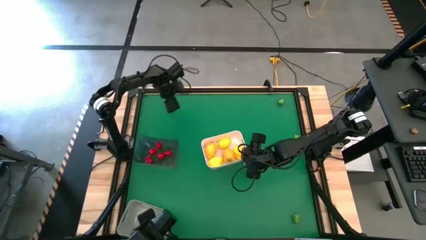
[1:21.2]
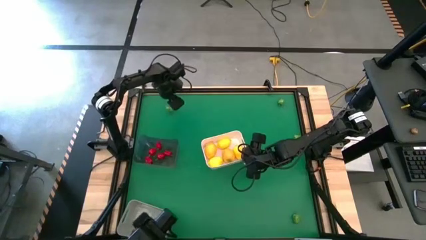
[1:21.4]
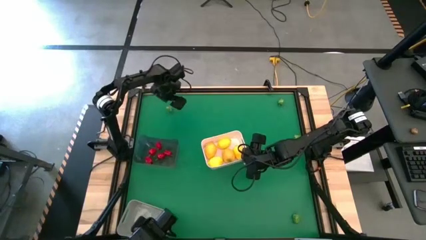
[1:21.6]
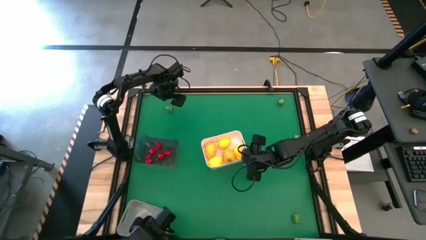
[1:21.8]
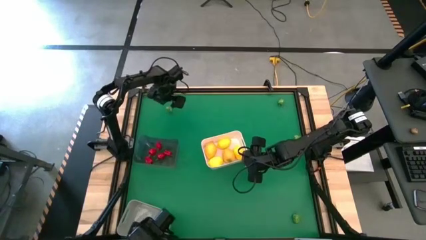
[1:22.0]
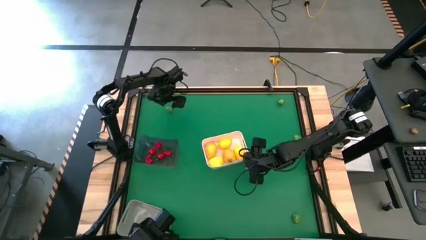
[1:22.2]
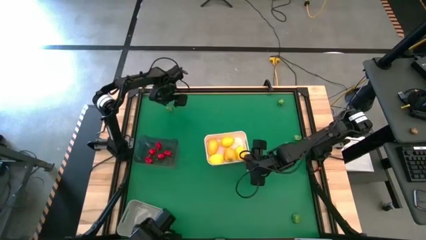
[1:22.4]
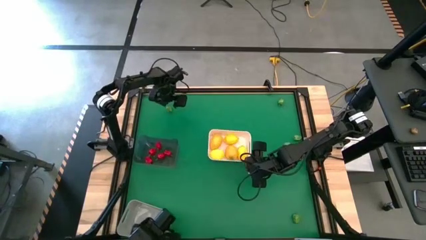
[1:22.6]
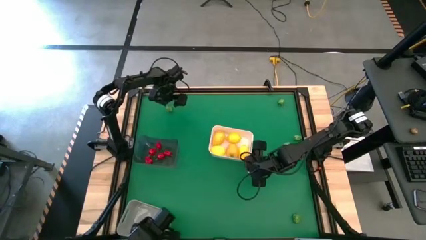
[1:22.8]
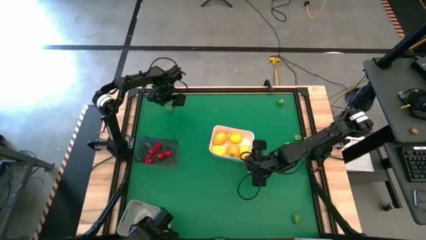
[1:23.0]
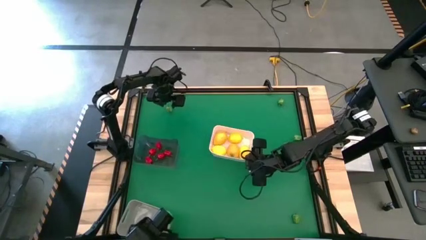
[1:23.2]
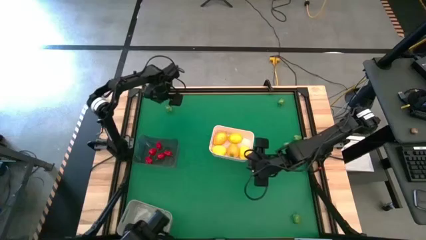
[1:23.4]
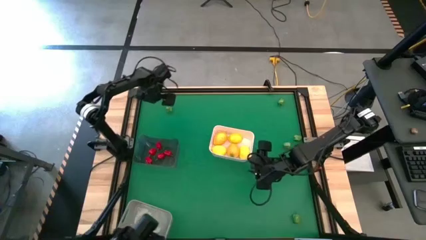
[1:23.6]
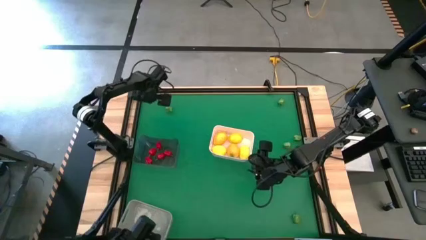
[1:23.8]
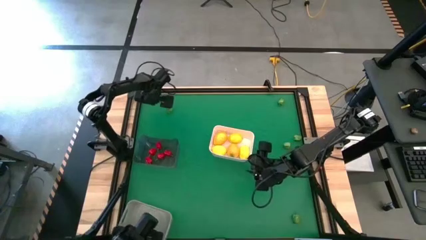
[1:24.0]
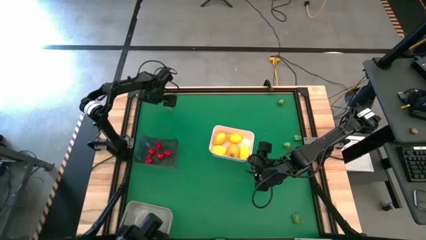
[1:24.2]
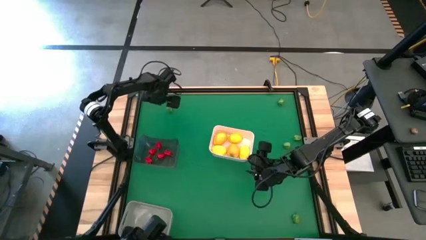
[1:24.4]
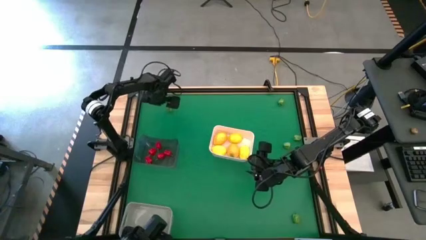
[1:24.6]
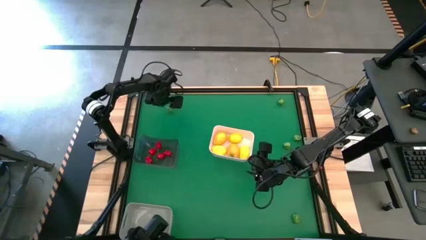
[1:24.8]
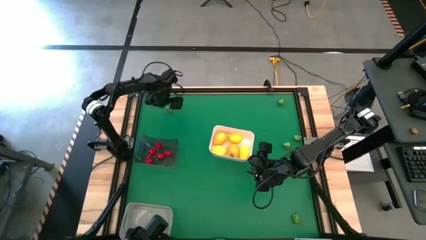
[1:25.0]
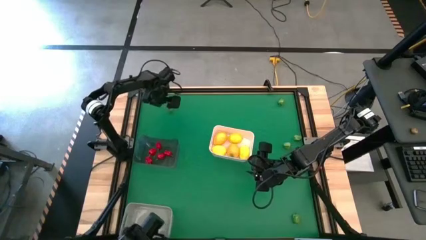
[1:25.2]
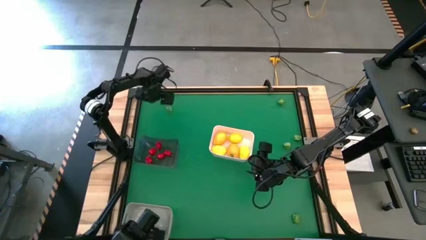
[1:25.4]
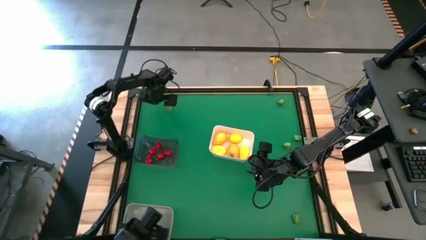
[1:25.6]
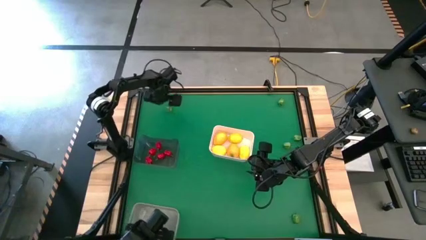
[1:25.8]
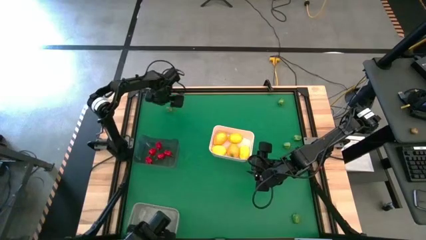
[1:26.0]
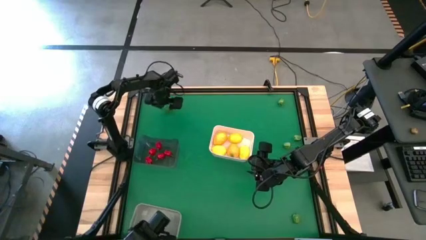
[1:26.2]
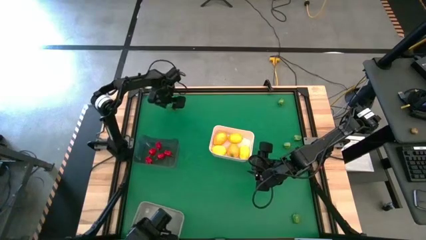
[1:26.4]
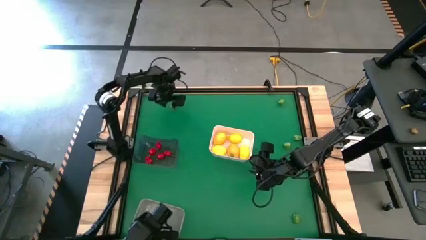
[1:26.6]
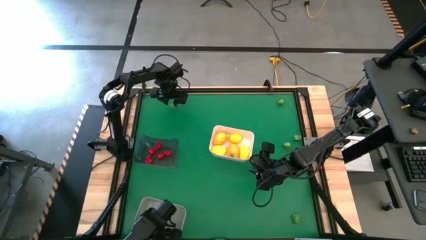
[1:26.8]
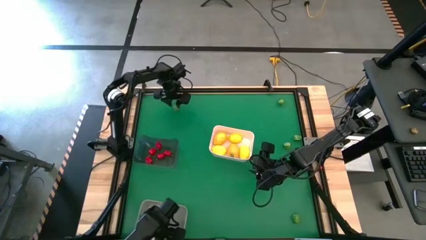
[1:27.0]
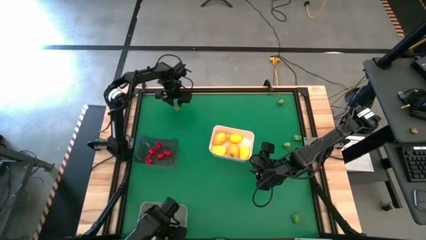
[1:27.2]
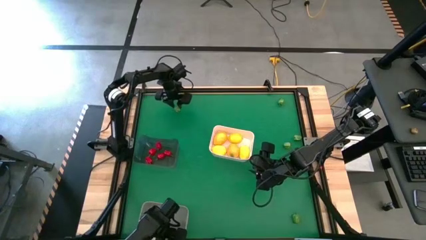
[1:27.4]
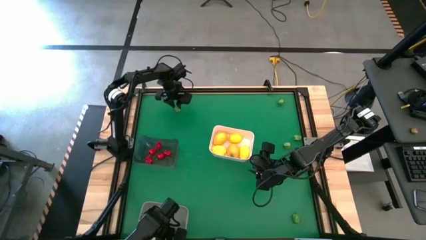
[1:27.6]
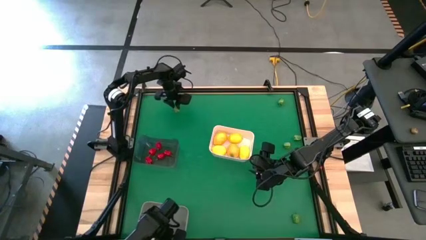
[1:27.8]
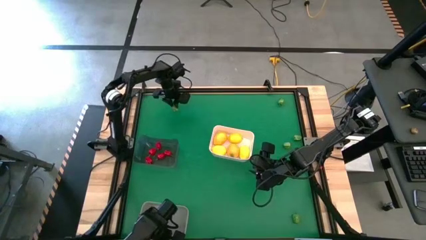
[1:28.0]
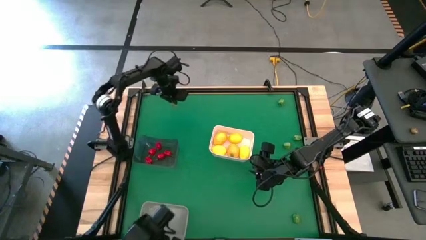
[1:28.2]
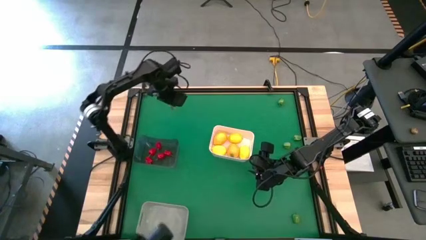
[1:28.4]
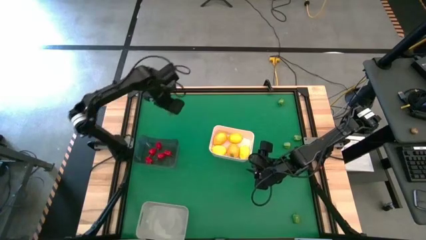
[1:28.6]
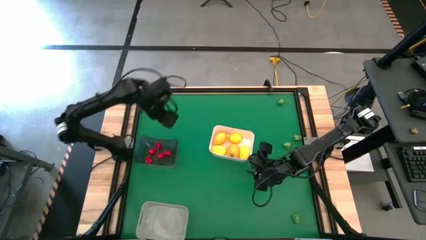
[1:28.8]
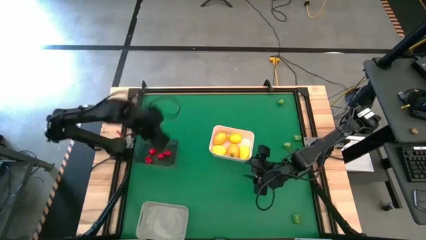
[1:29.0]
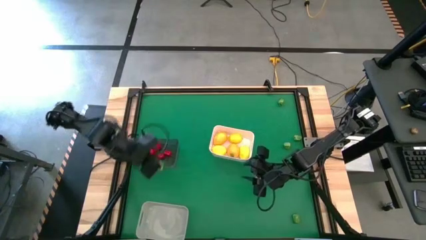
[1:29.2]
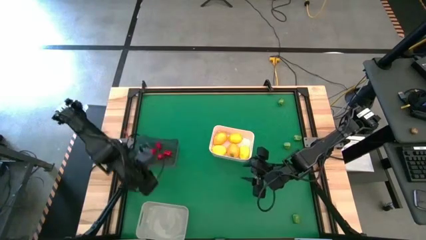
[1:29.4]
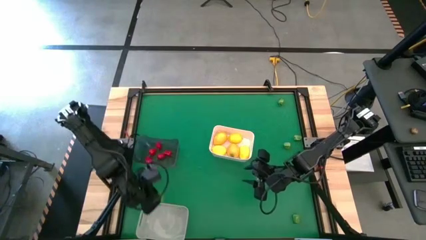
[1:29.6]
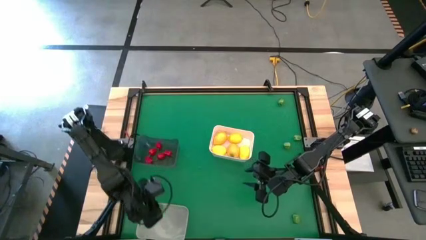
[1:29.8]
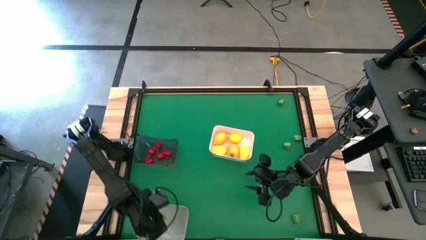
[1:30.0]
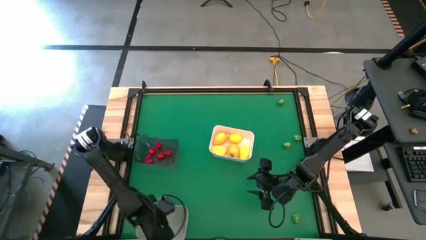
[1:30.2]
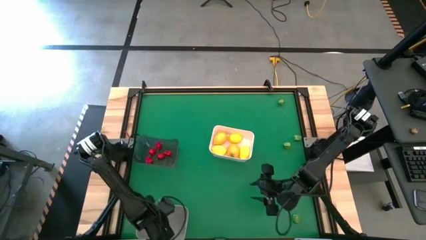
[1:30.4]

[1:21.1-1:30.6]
Task: Sort produce into baskets
Put the green chili pepper into the gray bin

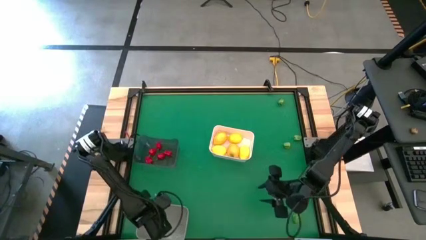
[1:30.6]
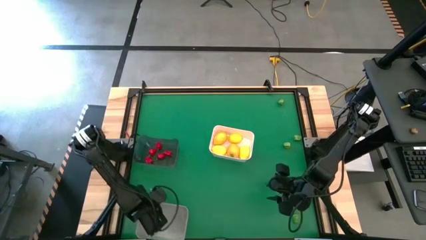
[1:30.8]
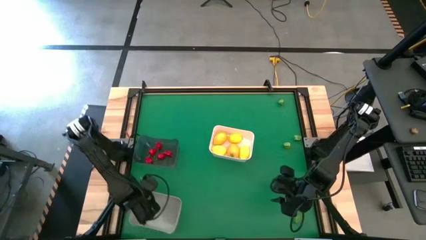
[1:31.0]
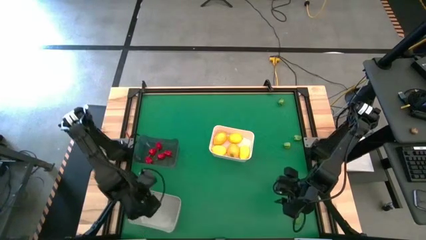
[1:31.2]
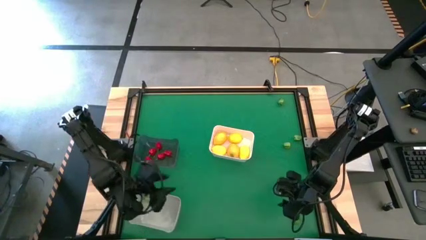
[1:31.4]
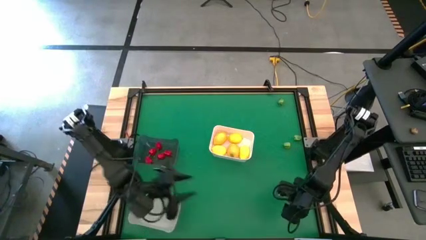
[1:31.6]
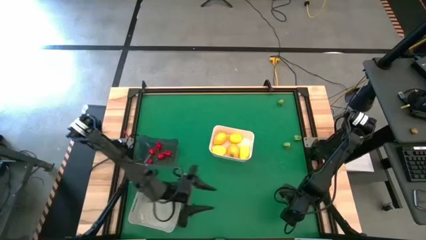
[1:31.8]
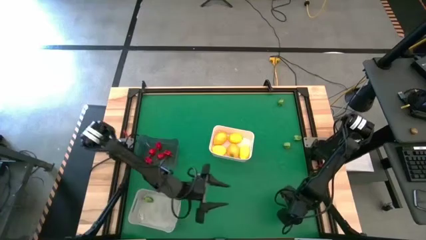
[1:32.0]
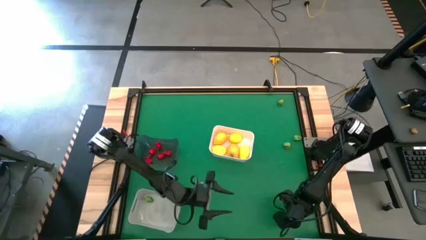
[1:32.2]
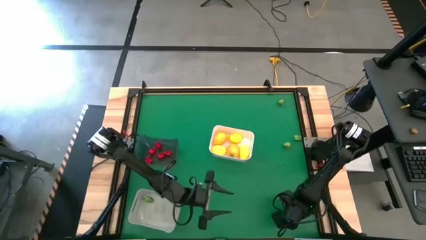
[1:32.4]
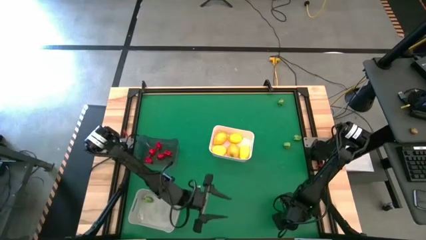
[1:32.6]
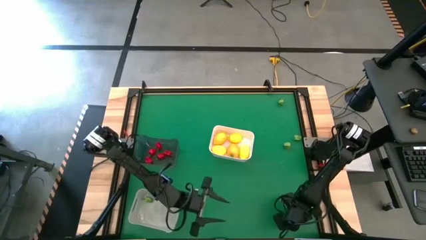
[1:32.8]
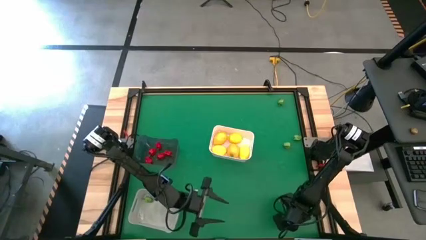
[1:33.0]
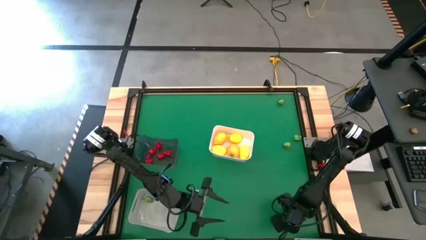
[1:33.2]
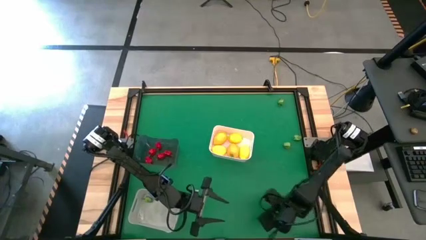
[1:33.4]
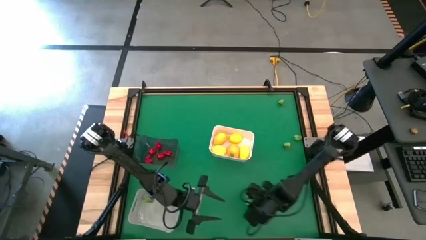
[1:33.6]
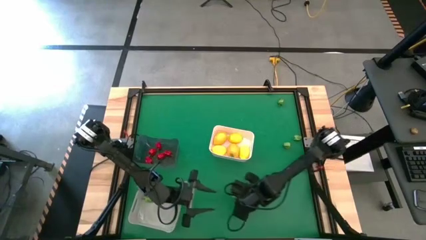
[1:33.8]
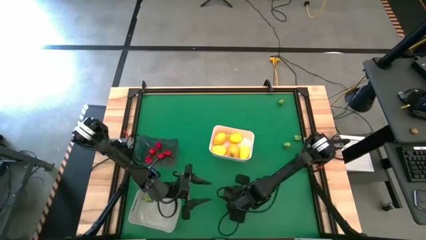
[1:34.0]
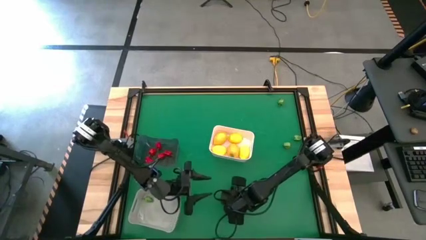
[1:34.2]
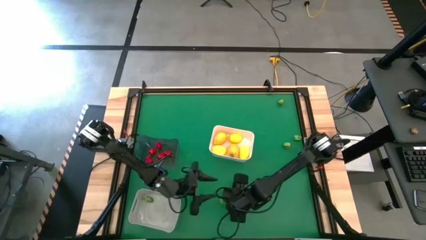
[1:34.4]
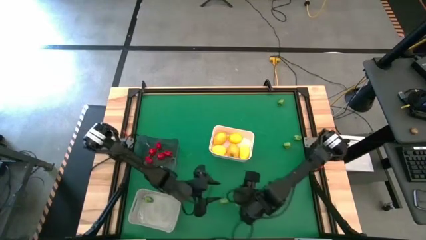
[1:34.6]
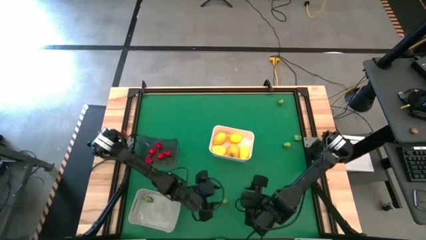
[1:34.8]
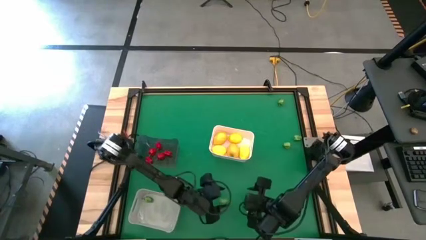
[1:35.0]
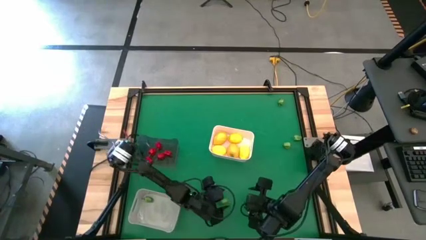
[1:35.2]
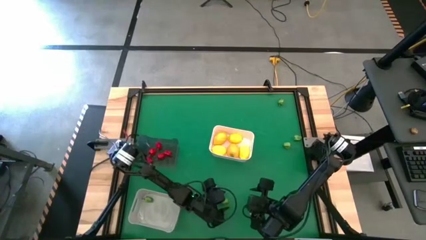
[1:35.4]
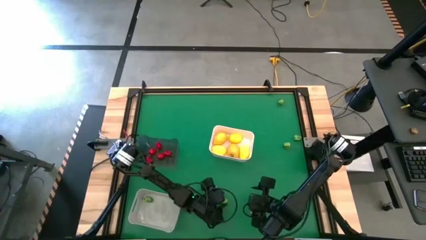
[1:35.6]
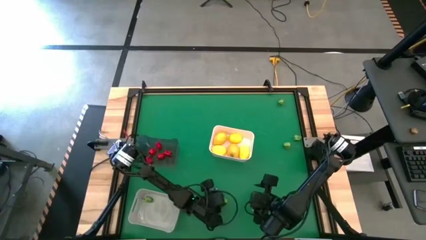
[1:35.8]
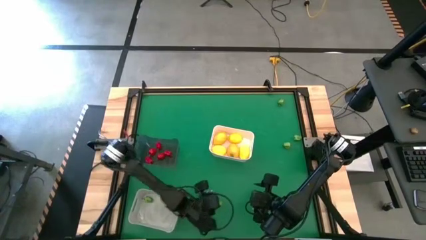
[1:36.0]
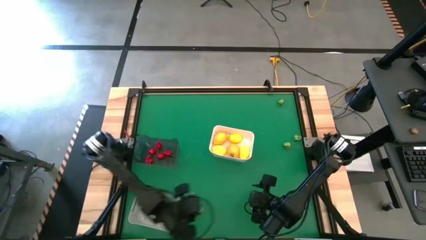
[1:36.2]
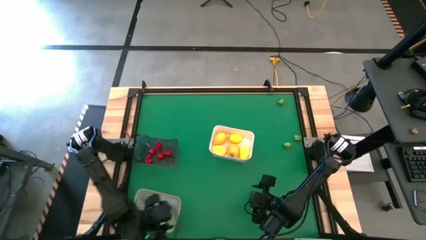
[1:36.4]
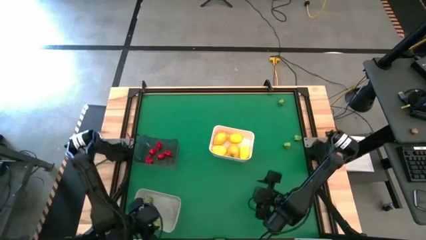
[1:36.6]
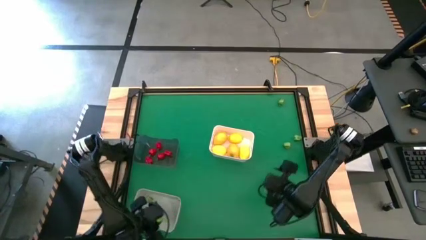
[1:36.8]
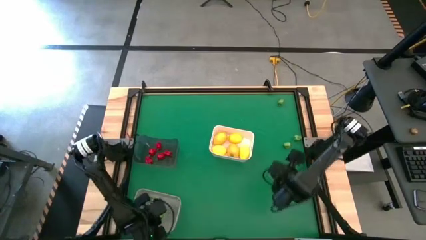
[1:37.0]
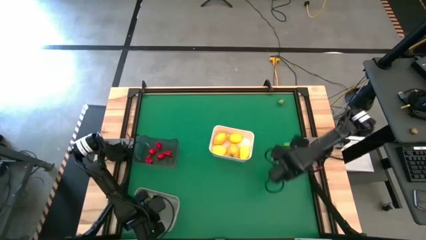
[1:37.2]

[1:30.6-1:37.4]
Put the green chili pepper into the gray bin

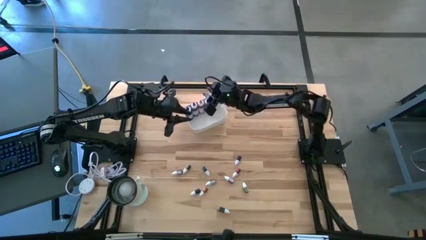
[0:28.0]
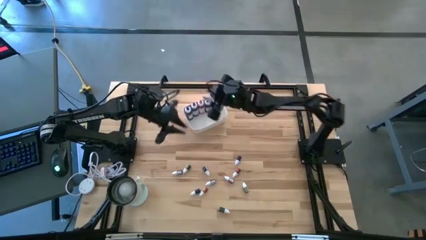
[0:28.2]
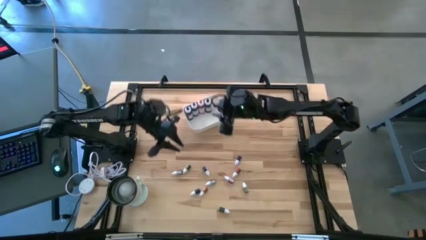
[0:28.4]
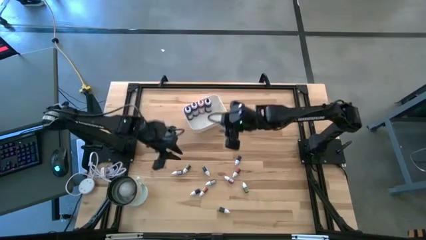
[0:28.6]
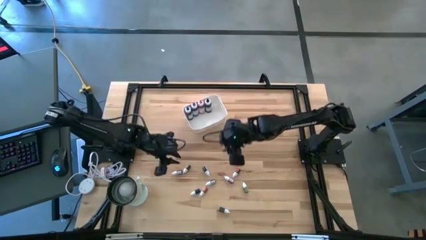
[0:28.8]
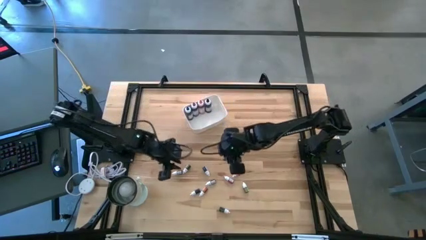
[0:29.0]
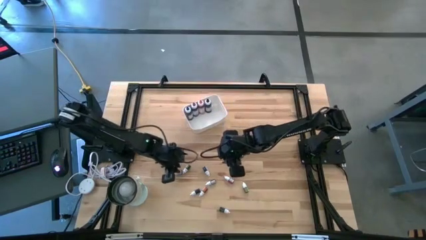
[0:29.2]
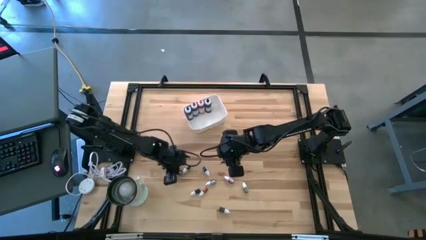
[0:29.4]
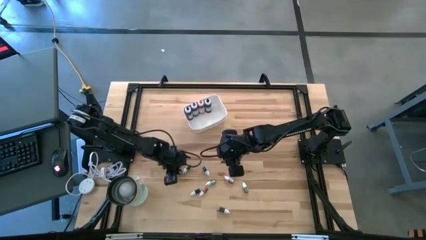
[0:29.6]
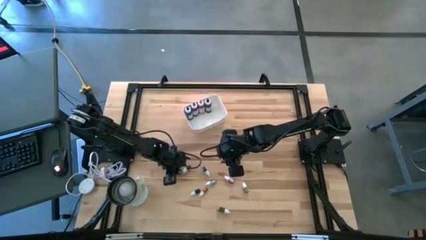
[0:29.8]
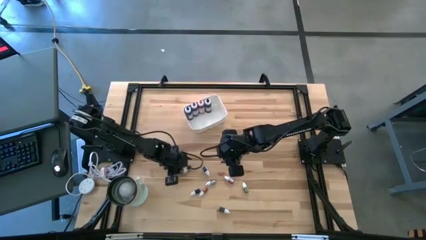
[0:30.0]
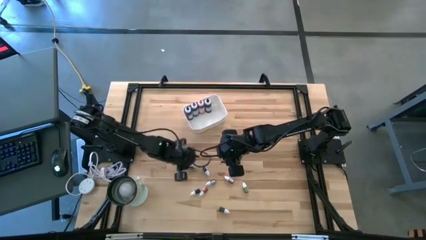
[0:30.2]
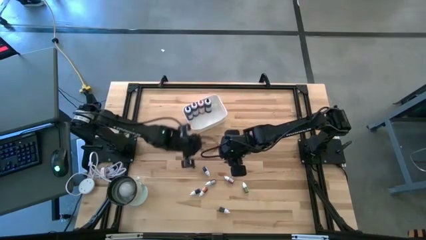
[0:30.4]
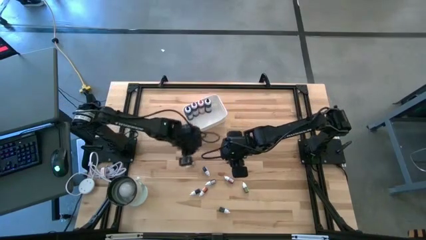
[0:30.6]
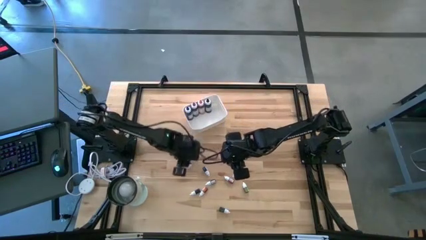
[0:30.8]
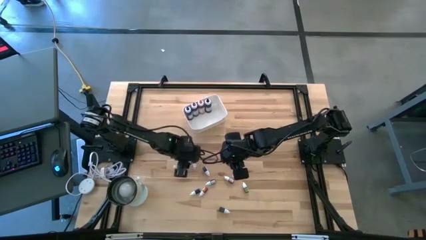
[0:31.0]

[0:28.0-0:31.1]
Task: Pick & Place food coloring
Move the small black food coloring slightly upward
